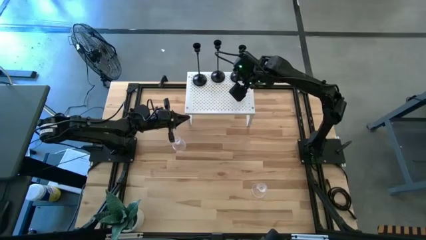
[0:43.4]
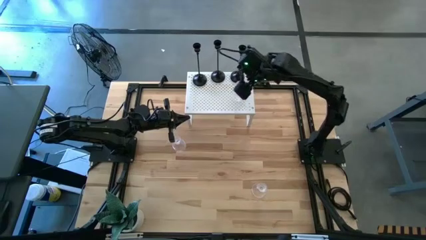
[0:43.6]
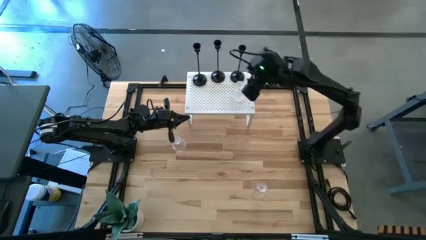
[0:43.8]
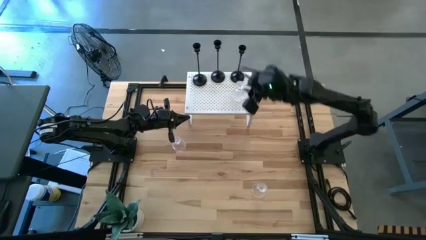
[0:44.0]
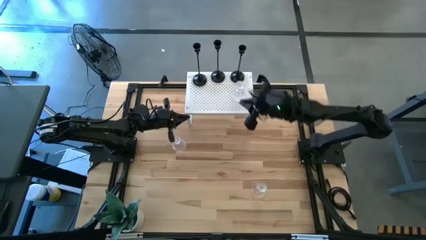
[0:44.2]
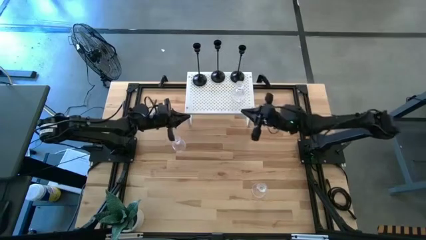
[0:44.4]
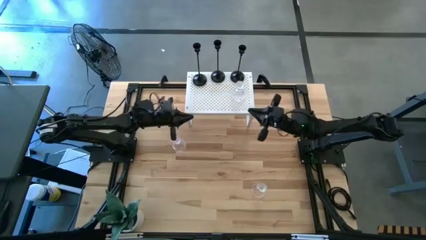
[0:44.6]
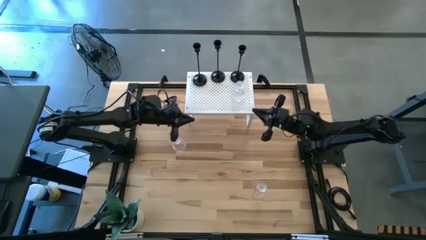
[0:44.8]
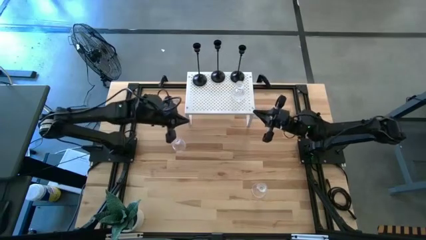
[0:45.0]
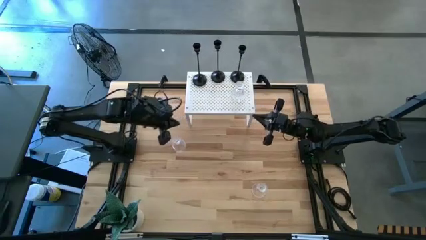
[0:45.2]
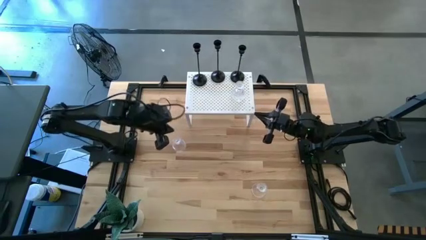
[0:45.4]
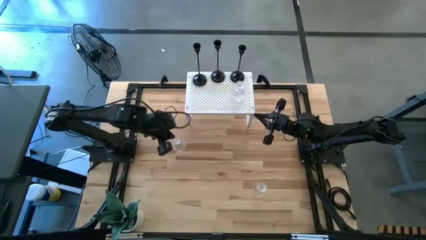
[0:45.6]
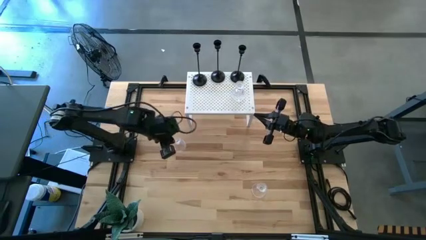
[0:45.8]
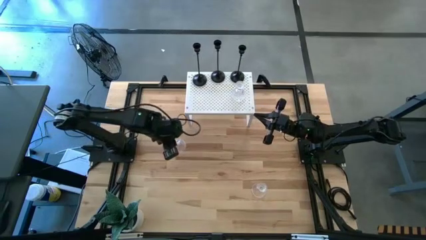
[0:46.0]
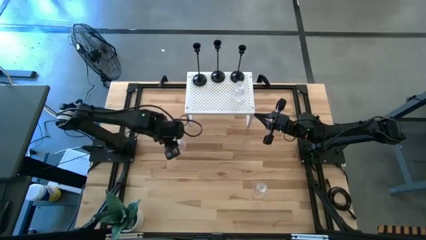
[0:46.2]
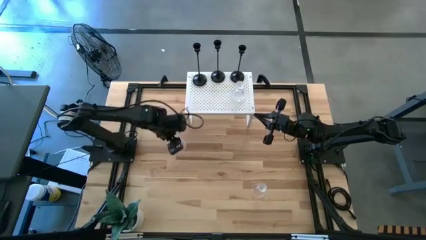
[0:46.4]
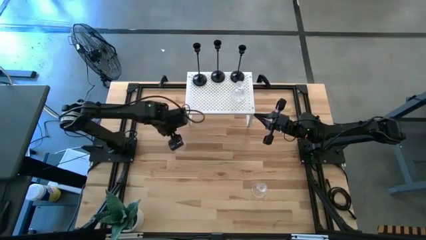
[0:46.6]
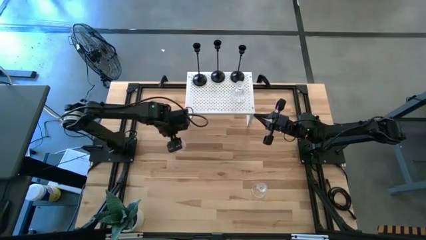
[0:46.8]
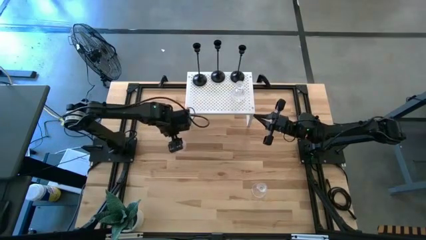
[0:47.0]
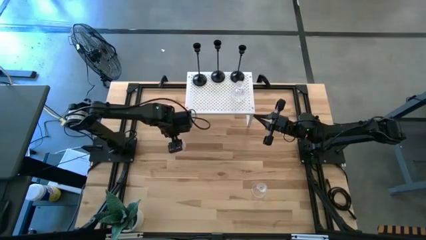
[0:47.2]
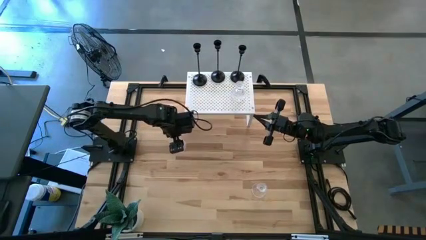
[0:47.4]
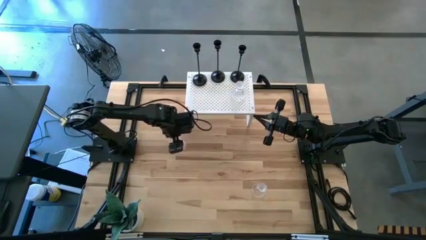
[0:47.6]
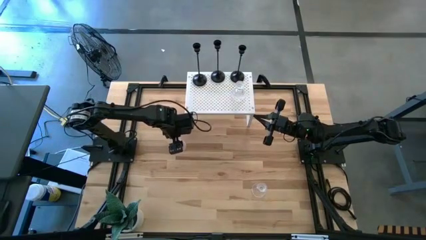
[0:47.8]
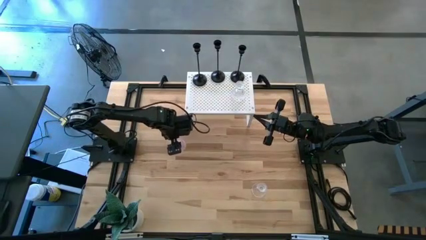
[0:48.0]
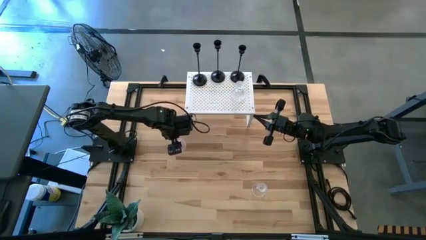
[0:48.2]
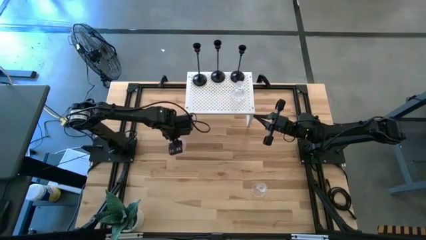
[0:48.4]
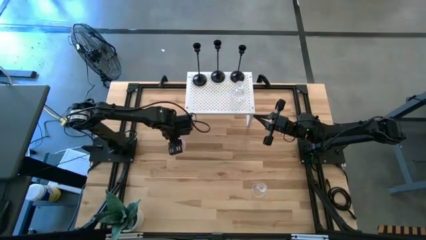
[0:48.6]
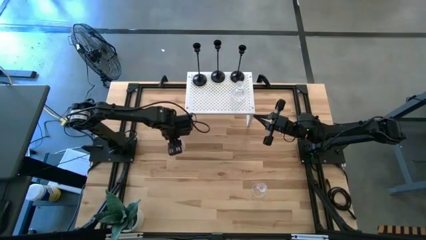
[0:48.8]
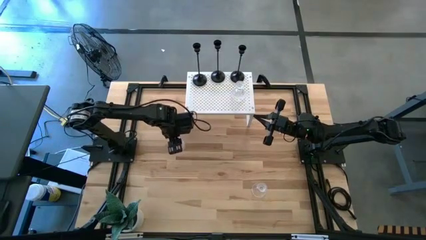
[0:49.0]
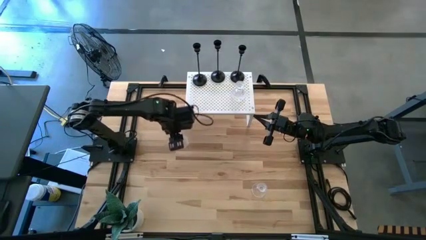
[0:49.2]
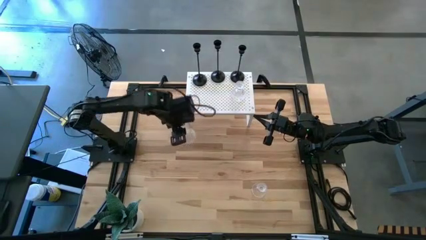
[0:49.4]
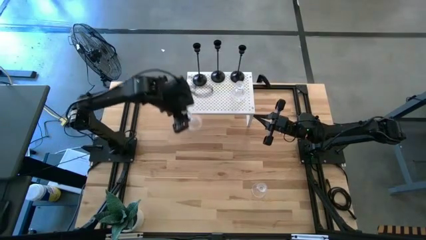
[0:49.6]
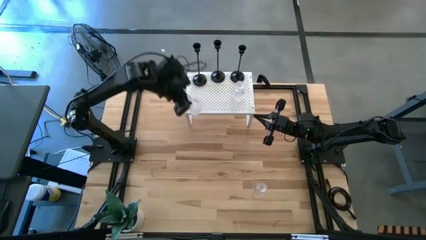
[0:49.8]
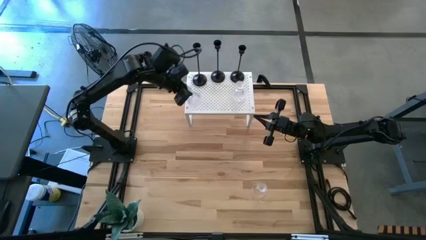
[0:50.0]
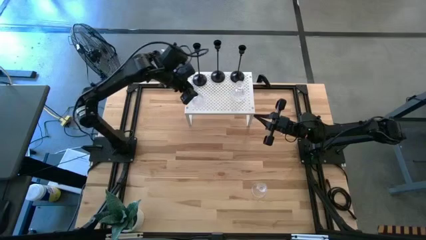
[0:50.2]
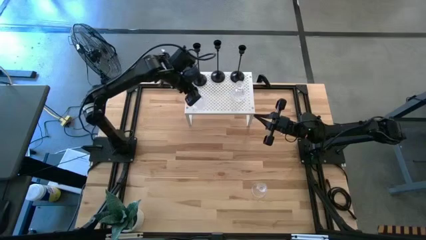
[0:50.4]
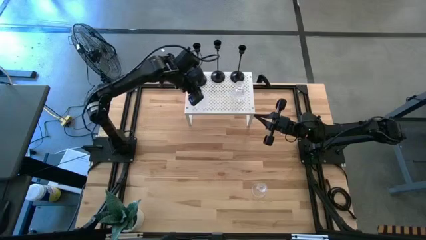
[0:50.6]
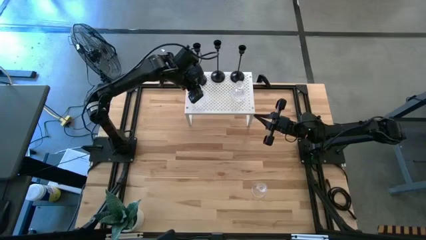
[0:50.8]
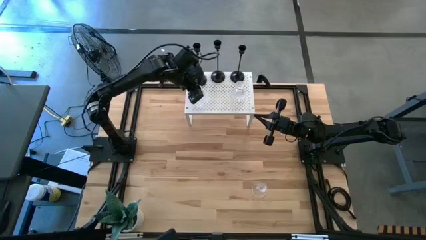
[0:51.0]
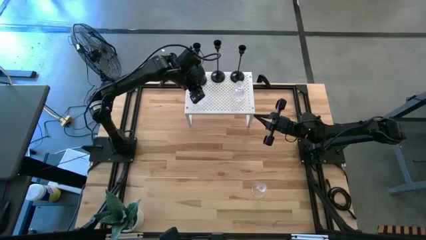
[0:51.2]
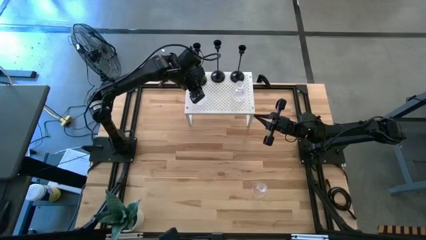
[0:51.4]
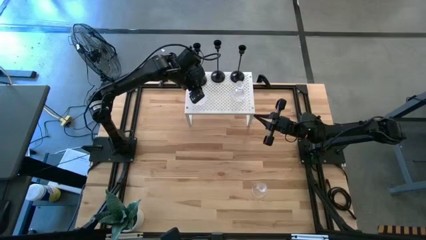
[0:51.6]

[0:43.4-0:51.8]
Task: Pick & Place candle stick holders
Put the top transparent glass candle holder aligned with the black candle holder on the shelf

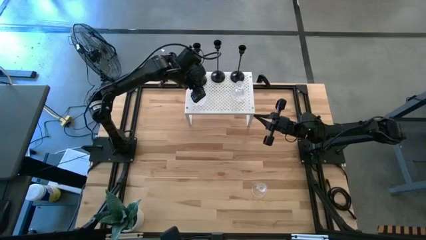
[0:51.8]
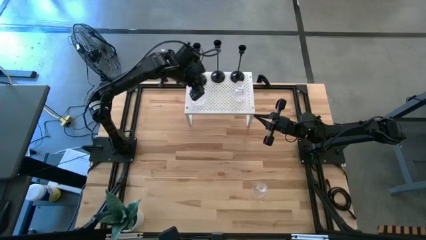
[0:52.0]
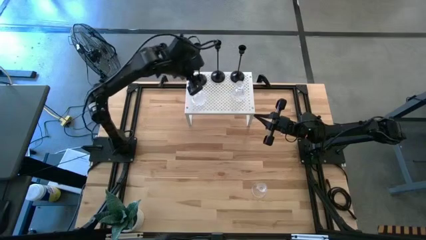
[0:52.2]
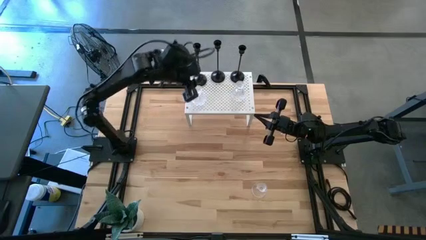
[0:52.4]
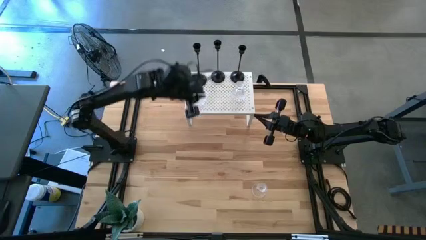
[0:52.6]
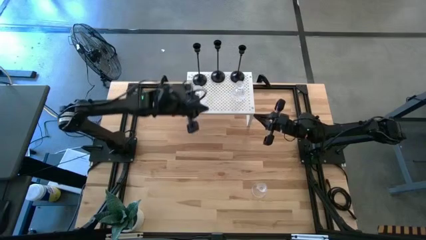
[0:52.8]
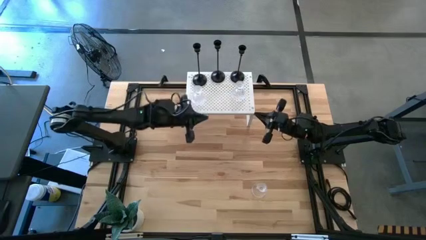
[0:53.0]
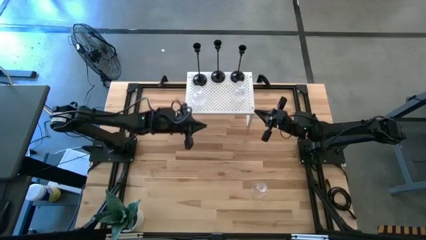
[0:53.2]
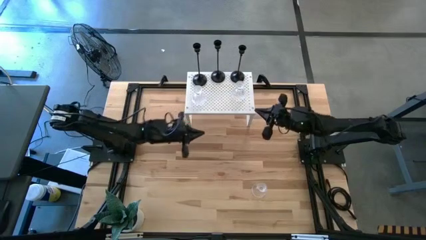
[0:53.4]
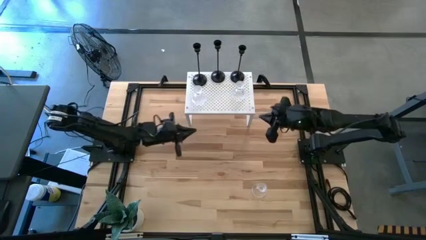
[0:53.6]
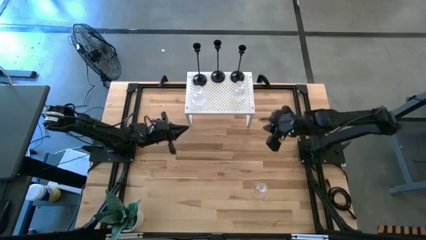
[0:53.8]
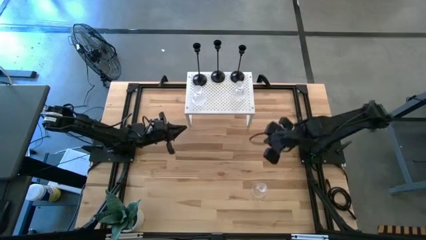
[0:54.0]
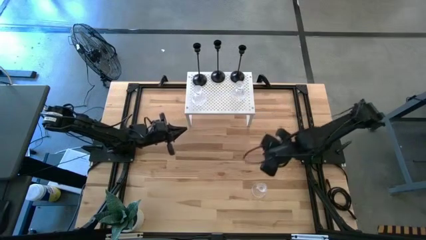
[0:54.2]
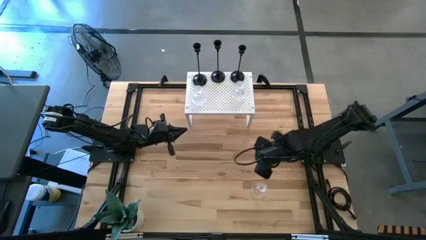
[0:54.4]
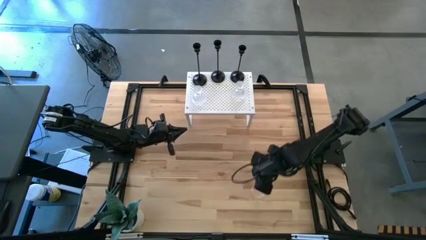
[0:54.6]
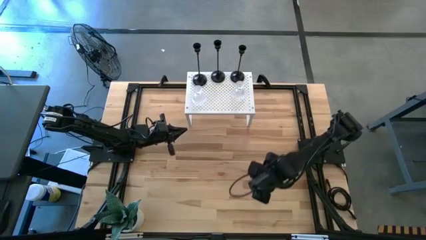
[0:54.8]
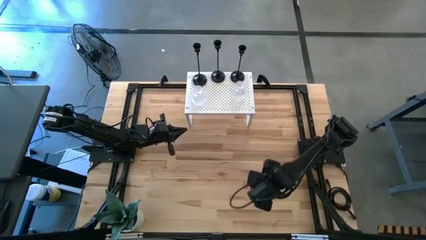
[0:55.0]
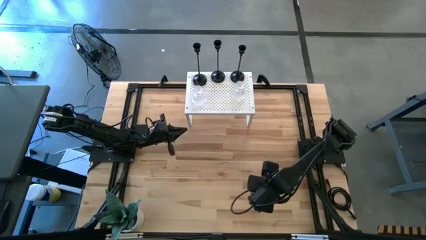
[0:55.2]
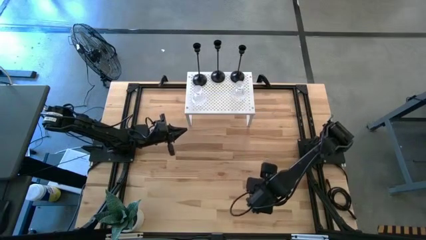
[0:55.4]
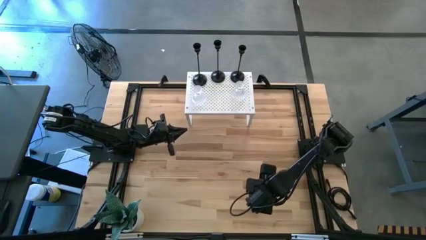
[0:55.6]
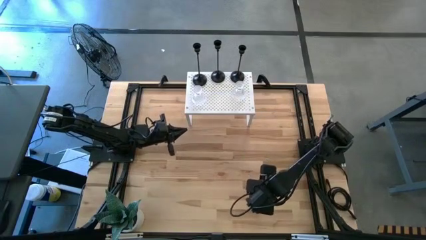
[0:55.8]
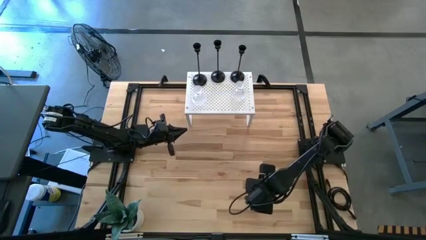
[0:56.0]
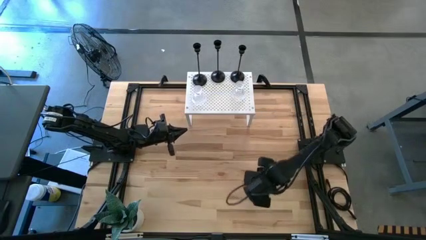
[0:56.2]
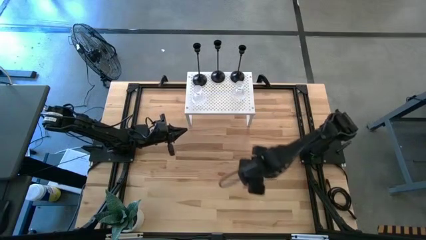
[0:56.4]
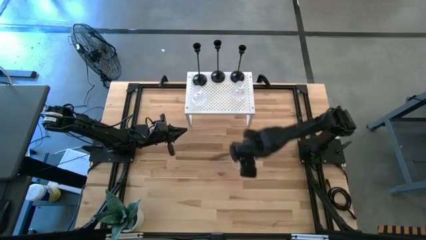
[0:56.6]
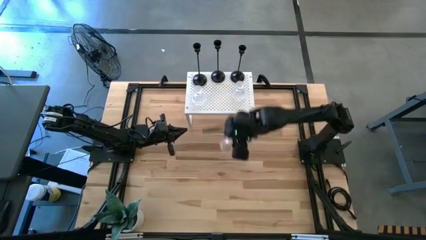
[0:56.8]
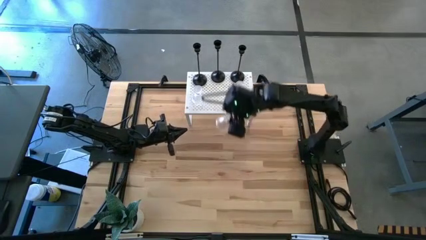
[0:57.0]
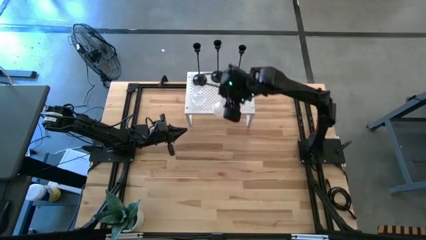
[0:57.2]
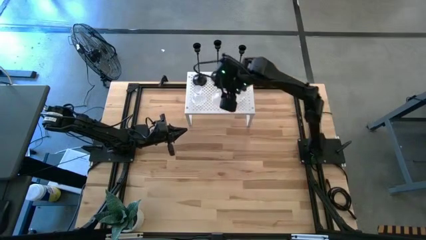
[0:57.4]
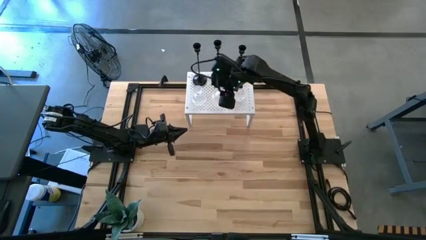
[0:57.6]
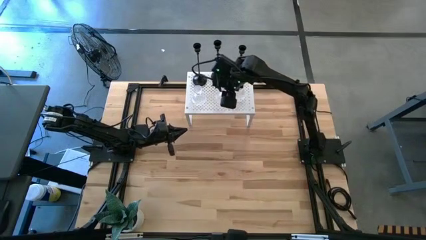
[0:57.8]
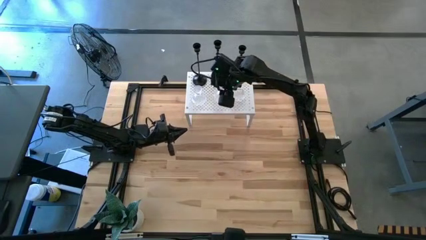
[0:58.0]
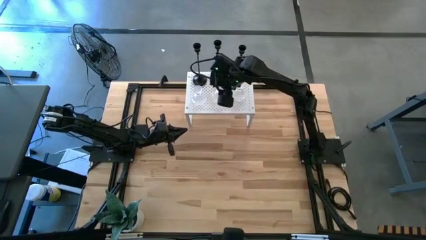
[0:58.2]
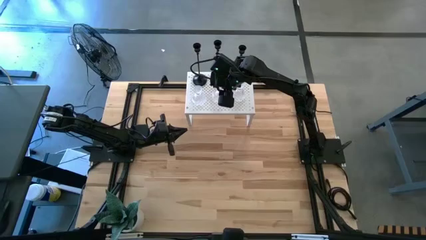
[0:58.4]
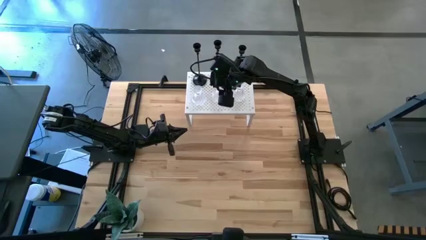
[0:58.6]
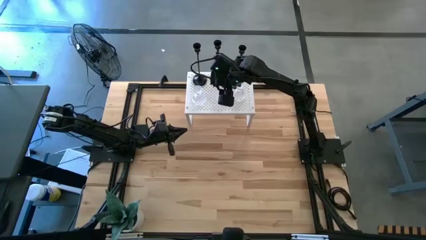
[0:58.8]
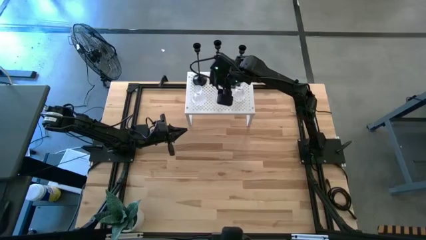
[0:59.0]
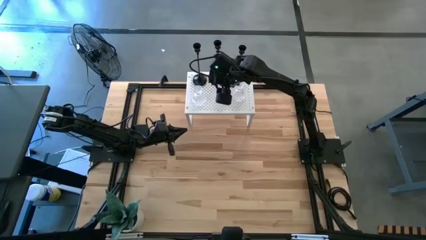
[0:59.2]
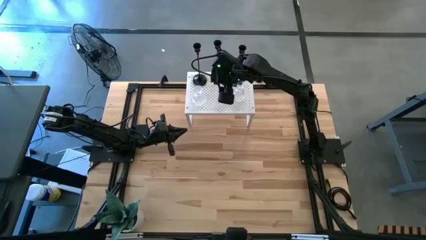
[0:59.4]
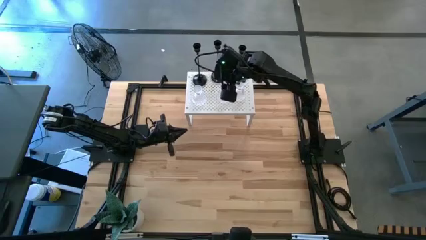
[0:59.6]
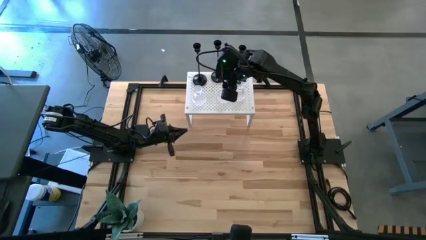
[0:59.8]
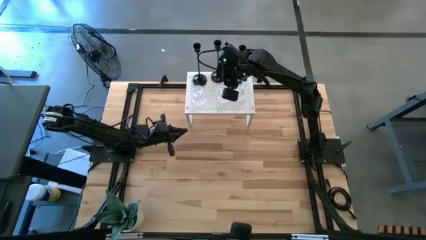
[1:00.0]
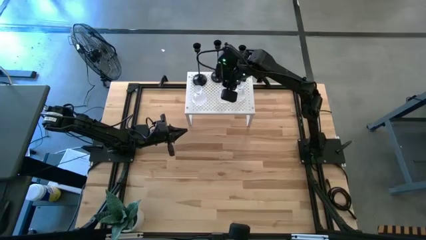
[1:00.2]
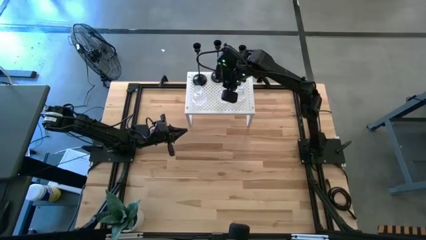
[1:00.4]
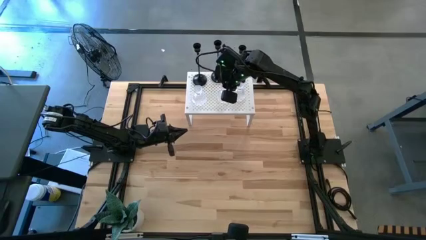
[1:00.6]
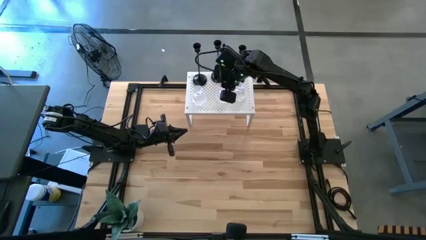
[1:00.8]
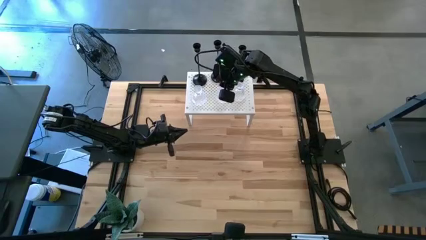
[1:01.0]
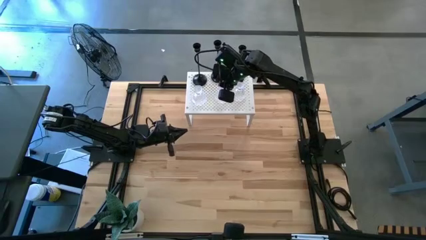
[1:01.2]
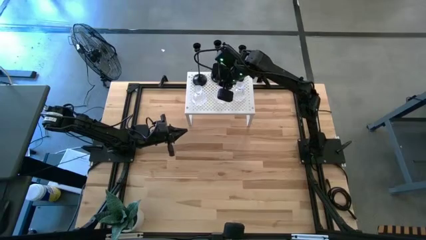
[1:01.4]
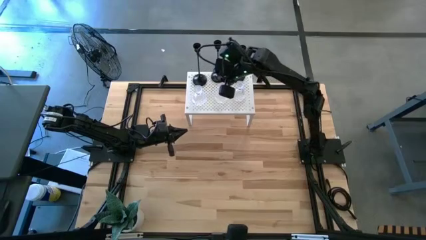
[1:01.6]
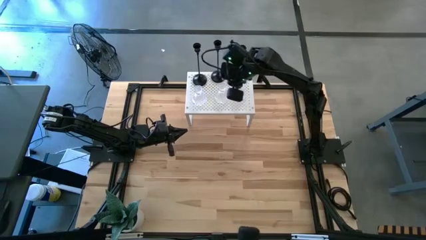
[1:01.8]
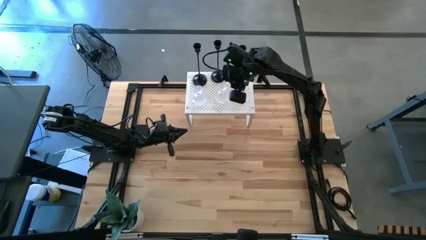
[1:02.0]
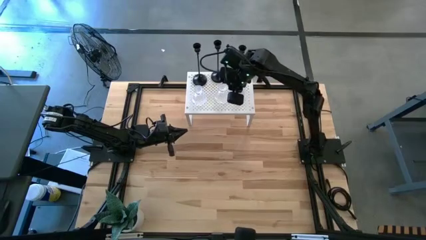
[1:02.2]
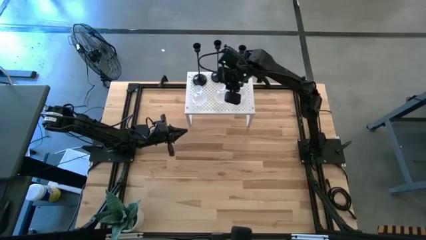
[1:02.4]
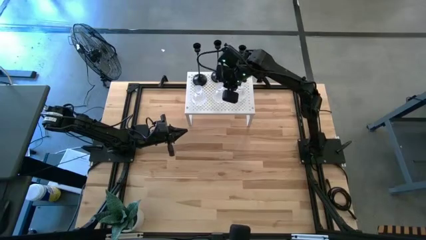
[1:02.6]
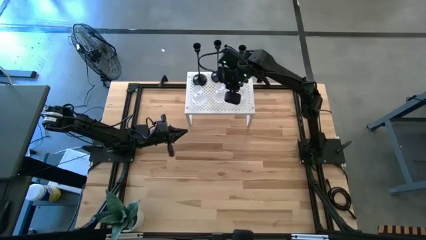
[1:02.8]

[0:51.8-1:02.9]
Put the transparent glass candle holder aligned with the black candle holder on the shelf
